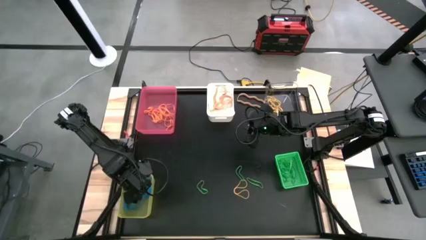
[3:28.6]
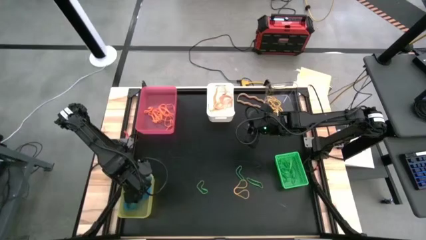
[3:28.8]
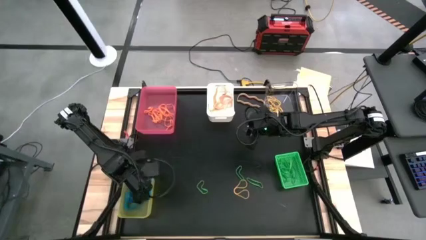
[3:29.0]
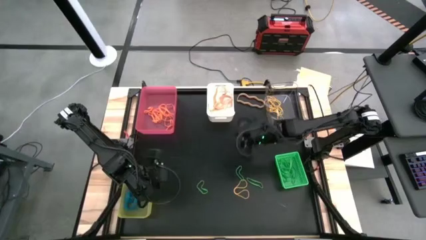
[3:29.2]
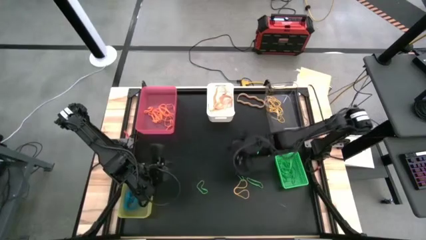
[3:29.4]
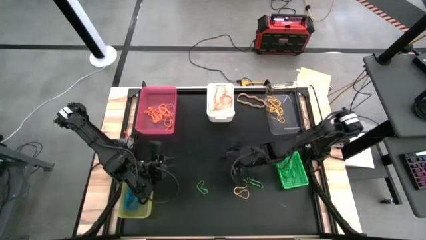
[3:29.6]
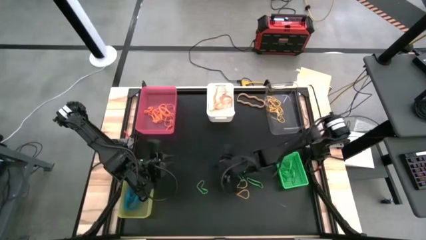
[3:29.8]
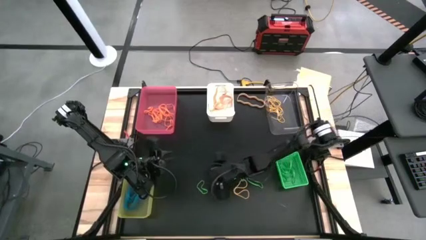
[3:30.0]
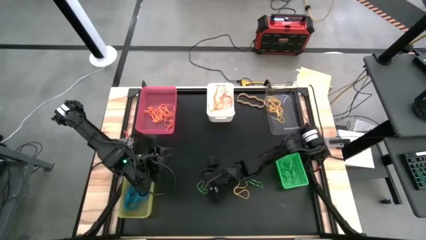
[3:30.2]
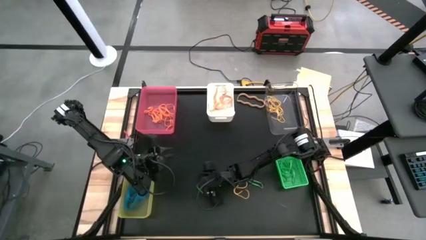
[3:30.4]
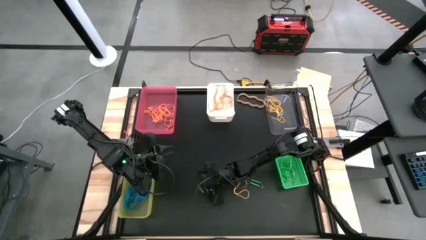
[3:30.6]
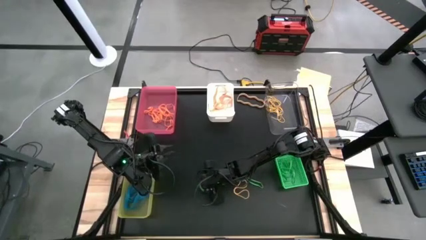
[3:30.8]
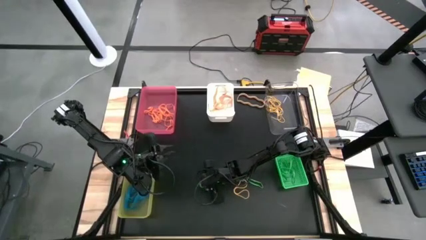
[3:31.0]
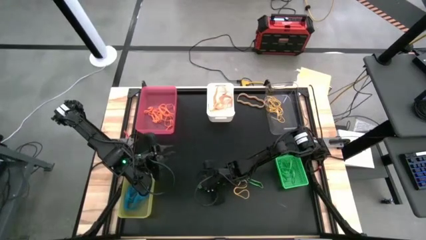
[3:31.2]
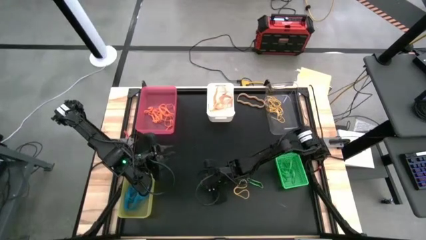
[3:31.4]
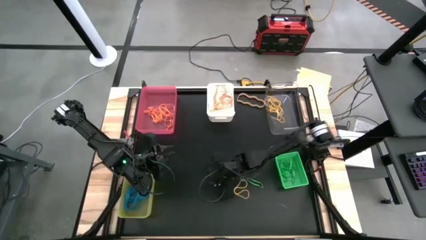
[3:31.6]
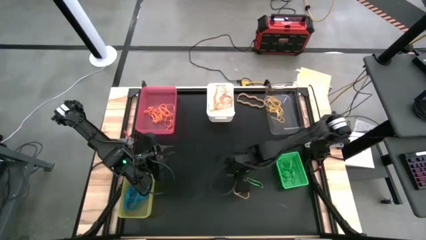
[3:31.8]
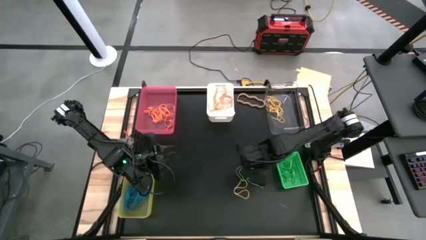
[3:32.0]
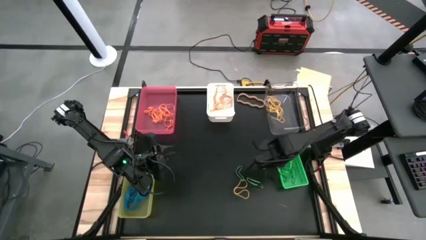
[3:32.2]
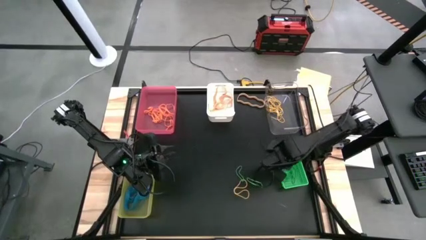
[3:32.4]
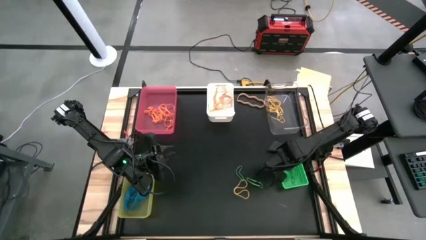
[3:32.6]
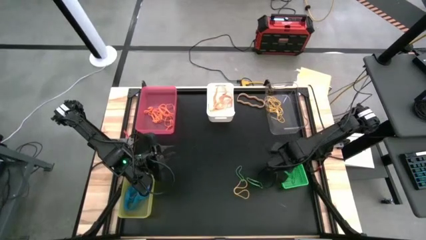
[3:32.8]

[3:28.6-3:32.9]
Task: Sort rubber bands into baskets
Put the green rubber band into the green bin

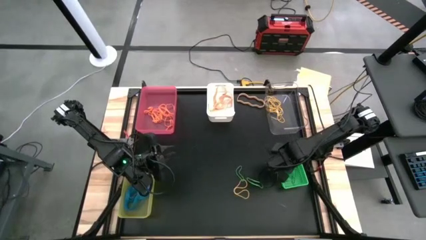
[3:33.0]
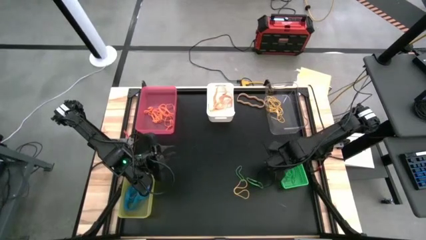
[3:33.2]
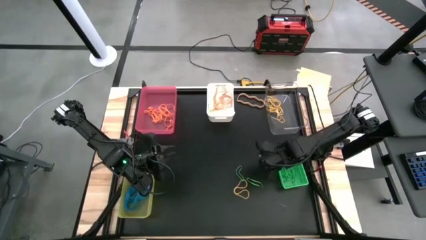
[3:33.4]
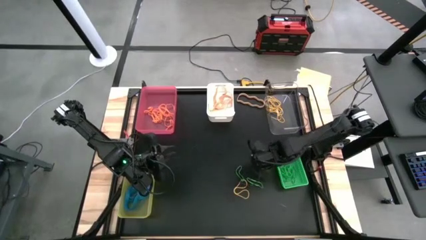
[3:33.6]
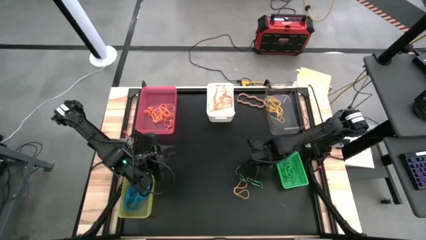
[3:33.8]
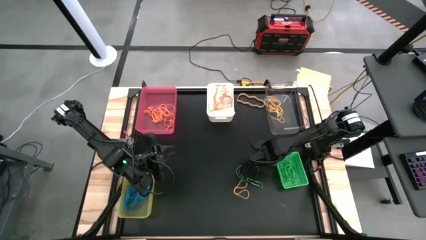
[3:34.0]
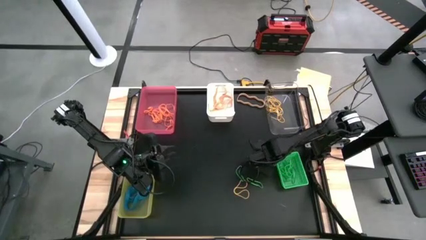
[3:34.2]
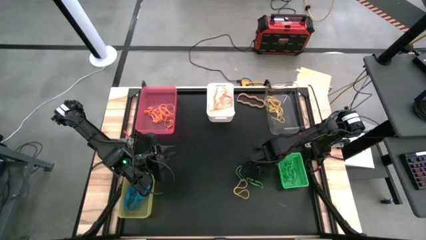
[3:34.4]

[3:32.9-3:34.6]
Adjust the green bin

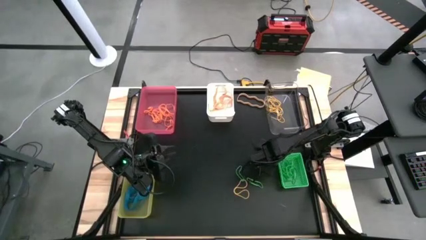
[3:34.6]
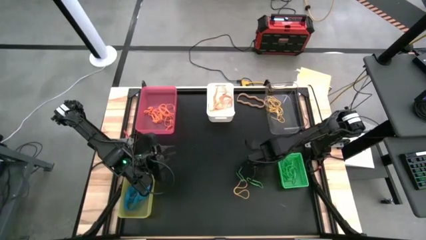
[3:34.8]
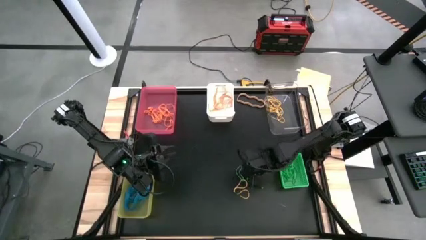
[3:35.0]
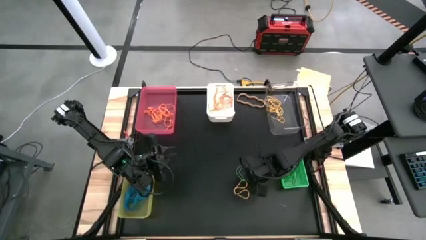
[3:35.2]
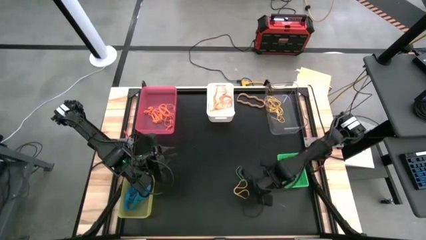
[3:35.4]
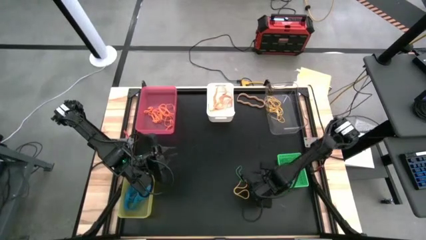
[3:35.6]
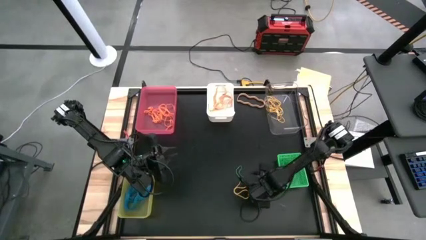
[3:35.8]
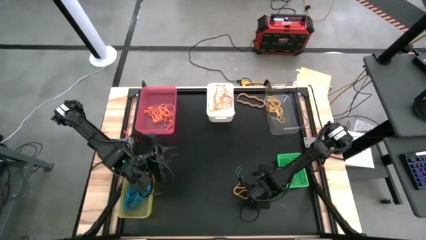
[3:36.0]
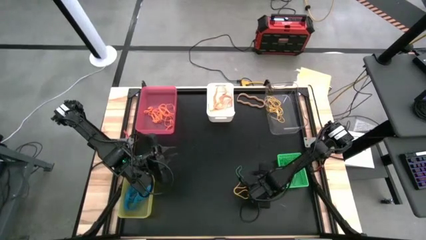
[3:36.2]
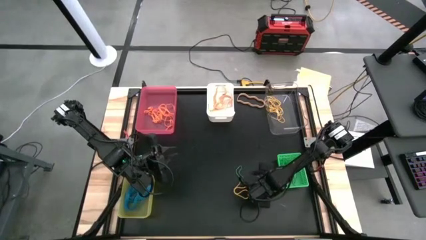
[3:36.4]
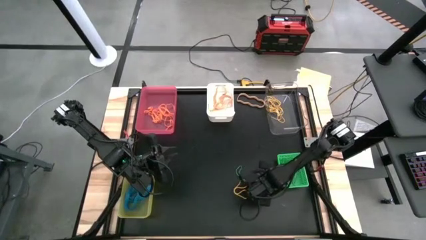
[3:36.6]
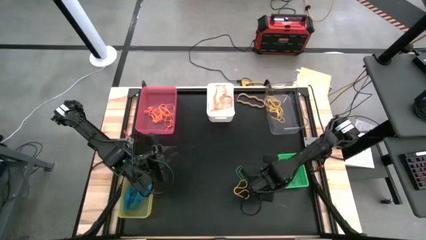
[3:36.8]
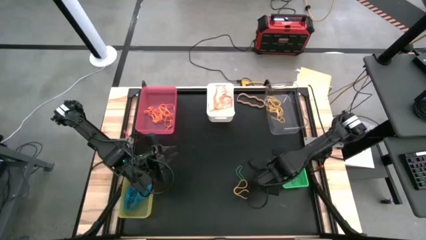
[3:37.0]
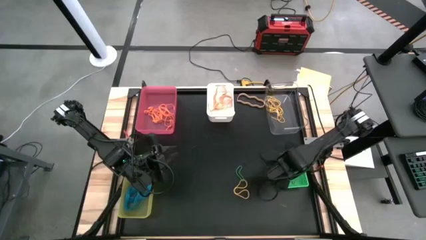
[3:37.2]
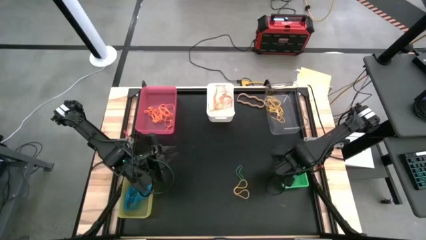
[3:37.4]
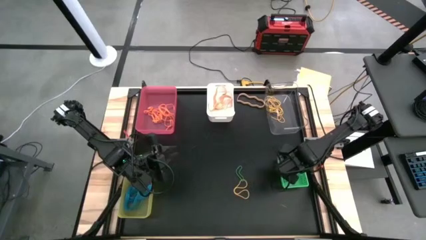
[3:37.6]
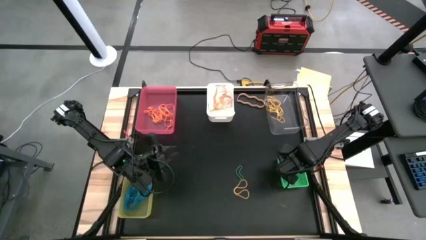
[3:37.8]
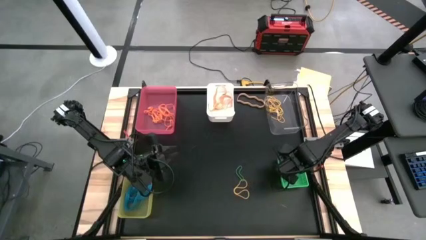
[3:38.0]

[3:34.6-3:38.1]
Put the green rubber band into the green bin

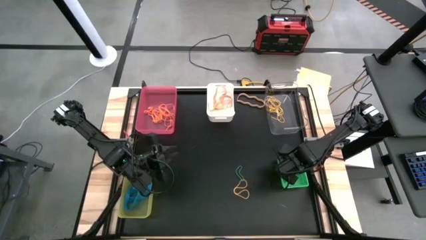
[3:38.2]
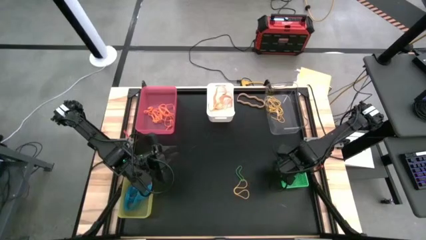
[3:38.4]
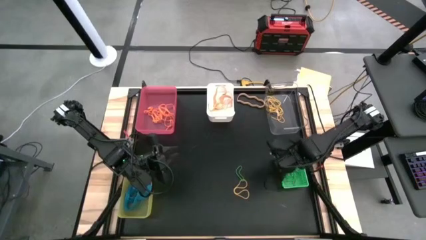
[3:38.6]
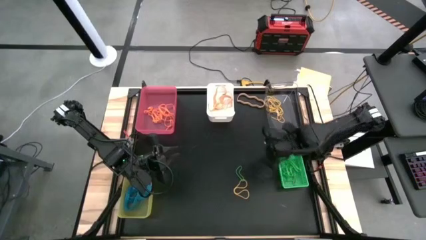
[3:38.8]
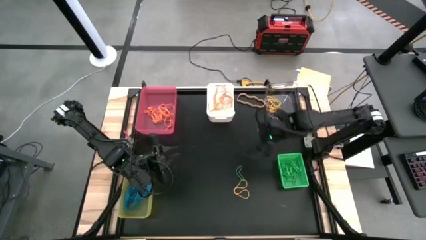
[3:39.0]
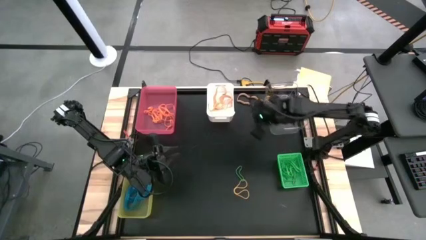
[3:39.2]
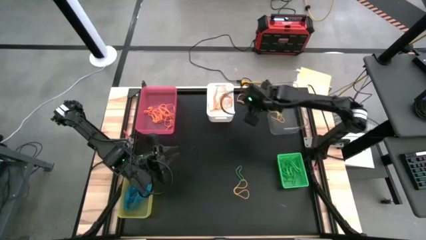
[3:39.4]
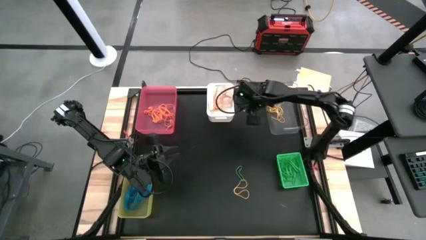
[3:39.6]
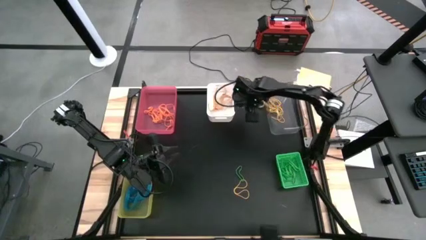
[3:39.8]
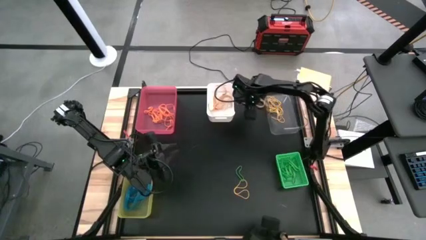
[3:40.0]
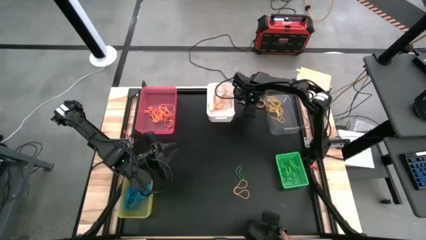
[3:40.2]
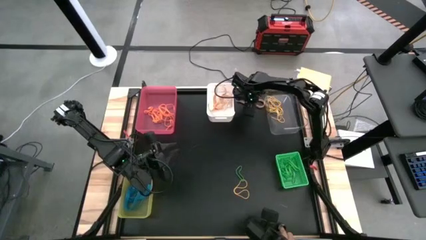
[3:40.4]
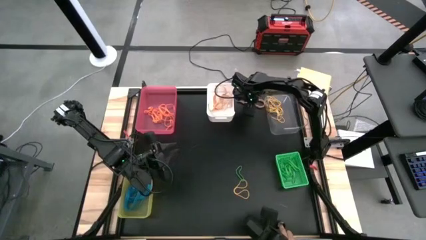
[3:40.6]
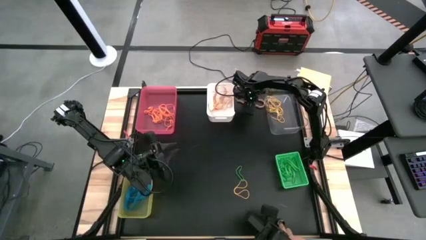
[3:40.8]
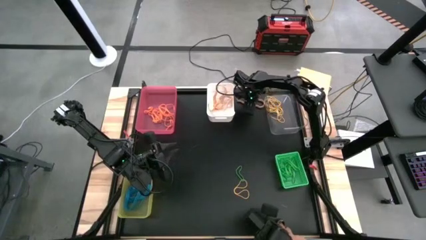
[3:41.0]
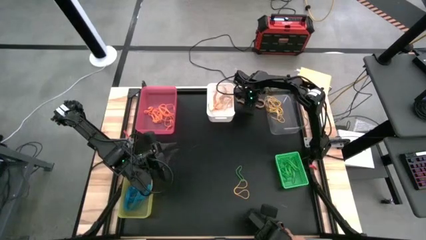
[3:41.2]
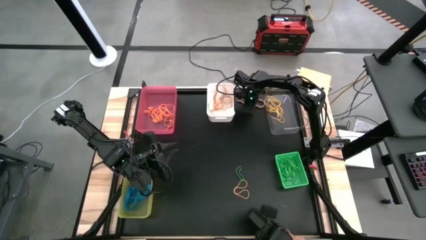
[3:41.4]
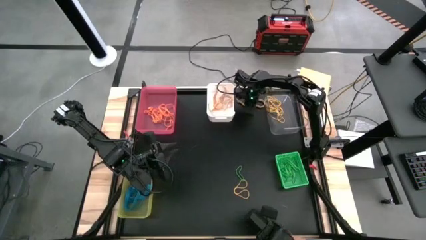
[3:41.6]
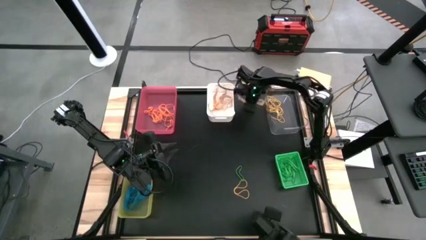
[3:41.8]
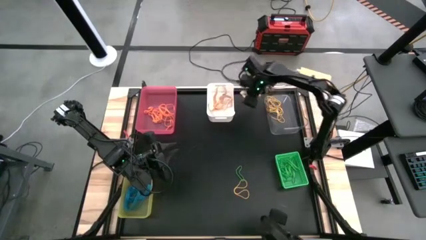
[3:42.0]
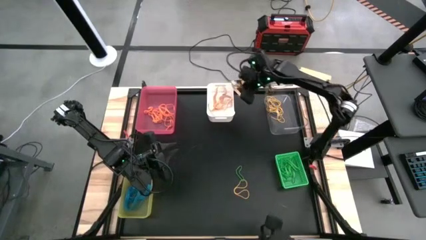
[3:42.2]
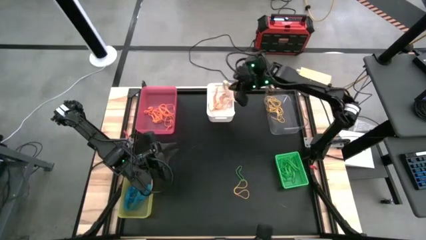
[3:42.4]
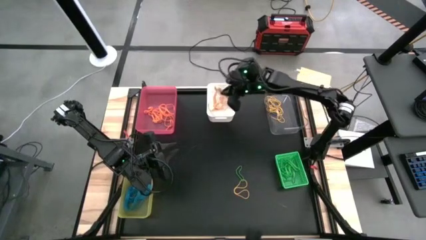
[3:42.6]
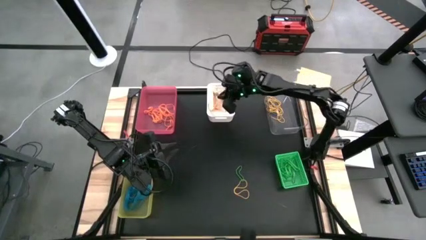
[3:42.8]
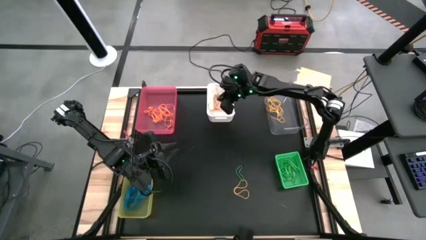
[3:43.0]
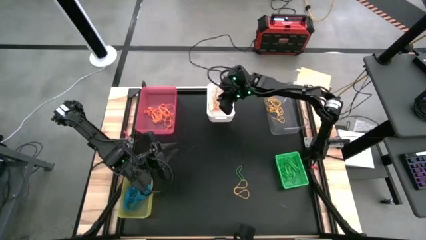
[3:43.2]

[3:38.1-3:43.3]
Put the light orange rubber band into the white bin

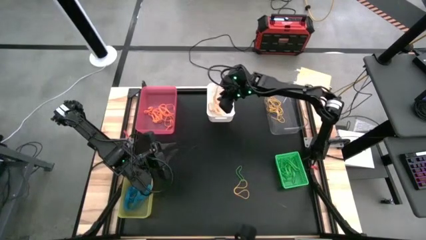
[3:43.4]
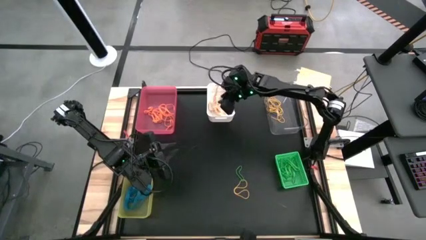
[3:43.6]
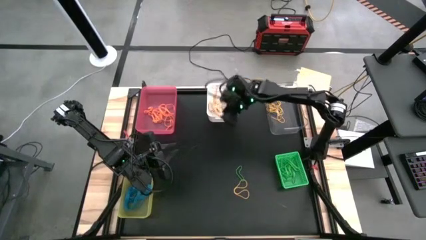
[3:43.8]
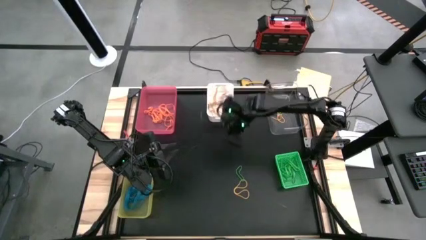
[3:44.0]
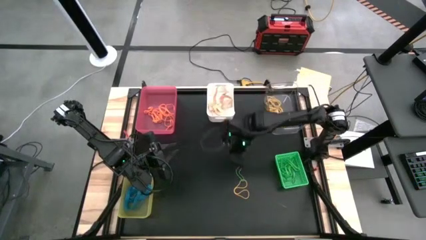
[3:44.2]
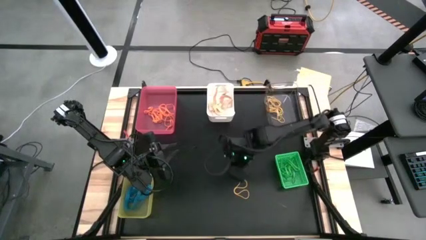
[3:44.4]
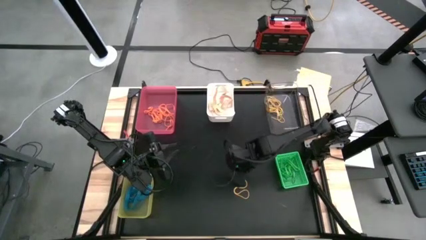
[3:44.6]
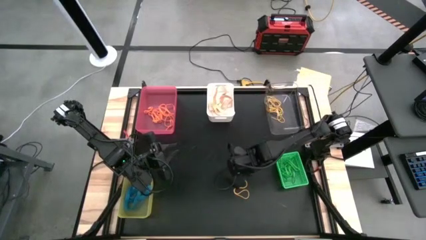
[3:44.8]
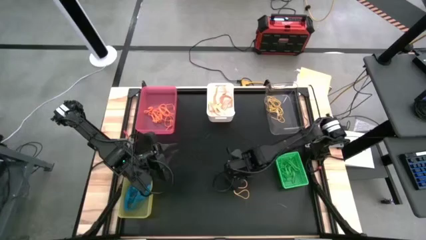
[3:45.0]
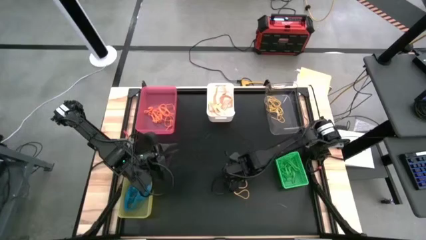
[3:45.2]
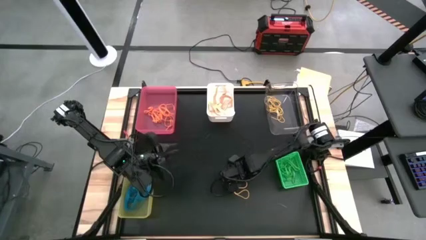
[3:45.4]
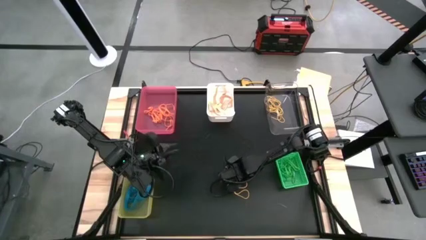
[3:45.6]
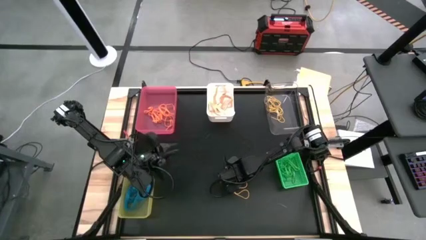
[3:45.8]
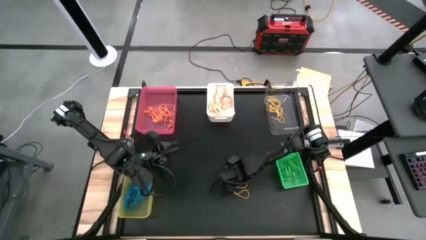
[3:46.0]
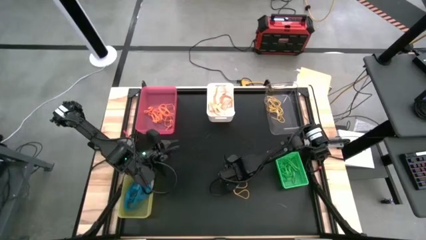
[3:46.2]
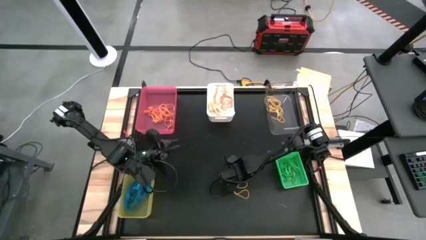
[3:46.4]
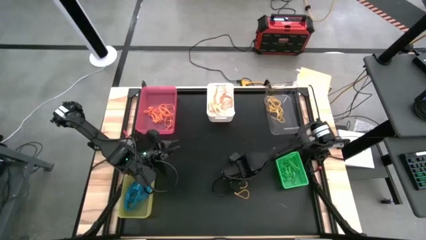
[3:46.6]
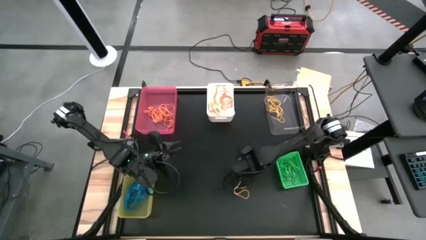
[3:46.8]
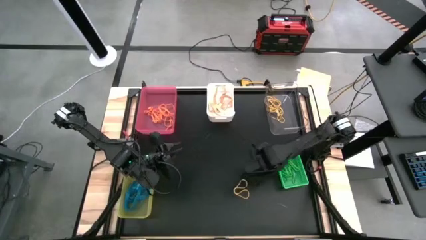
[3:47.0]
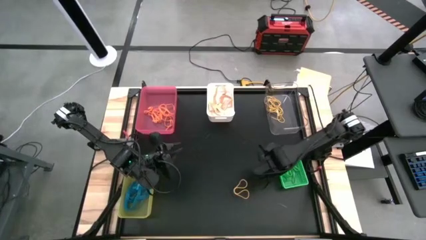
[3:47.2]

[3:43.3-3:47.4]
Put the green rubber band into the green bin
